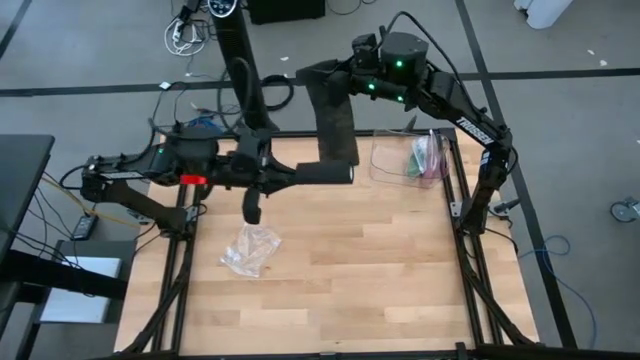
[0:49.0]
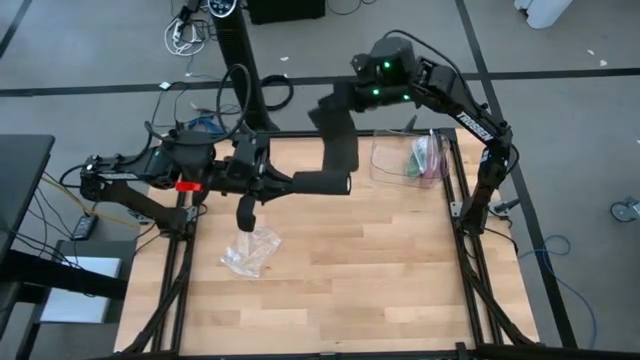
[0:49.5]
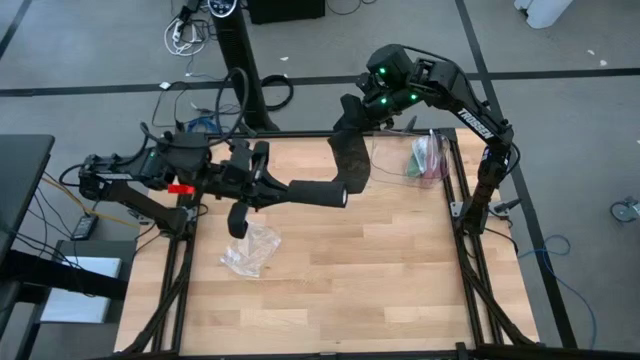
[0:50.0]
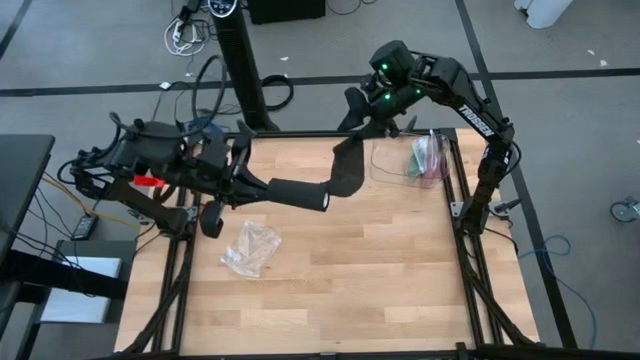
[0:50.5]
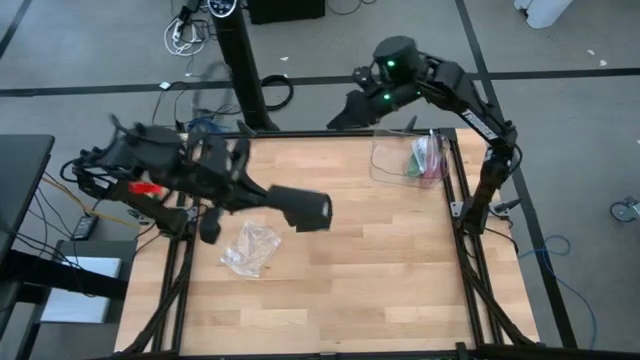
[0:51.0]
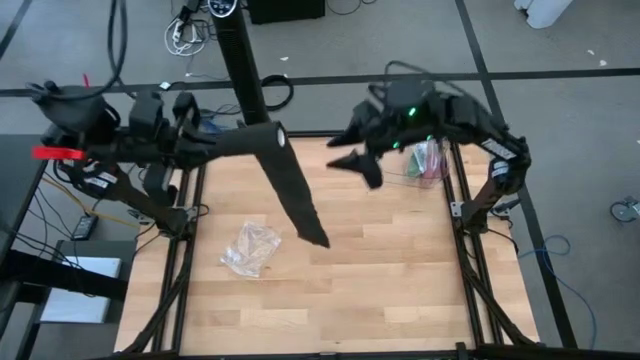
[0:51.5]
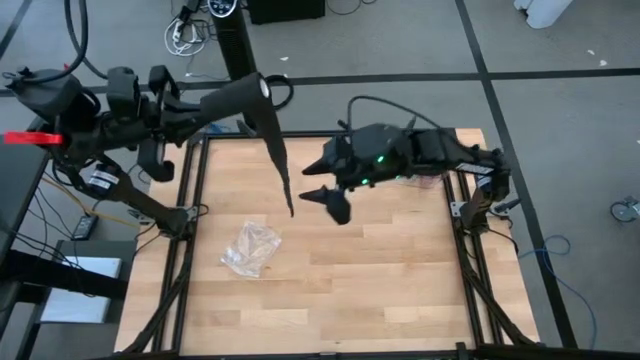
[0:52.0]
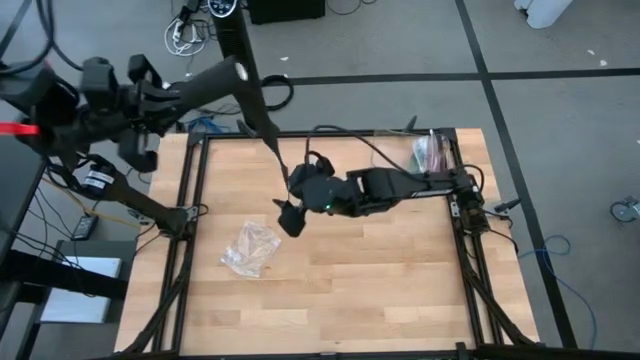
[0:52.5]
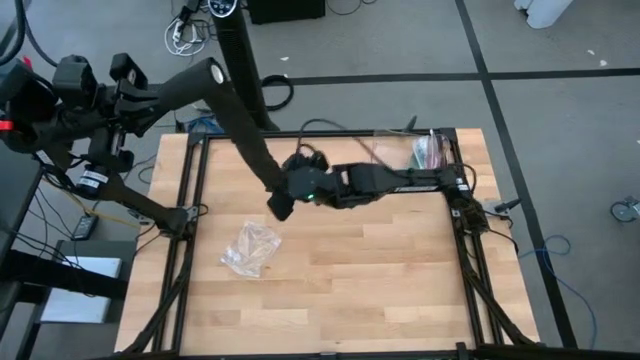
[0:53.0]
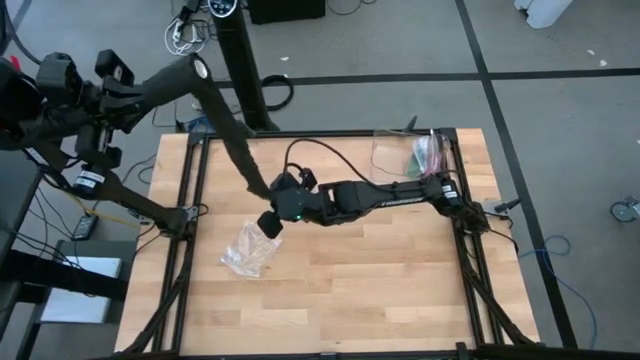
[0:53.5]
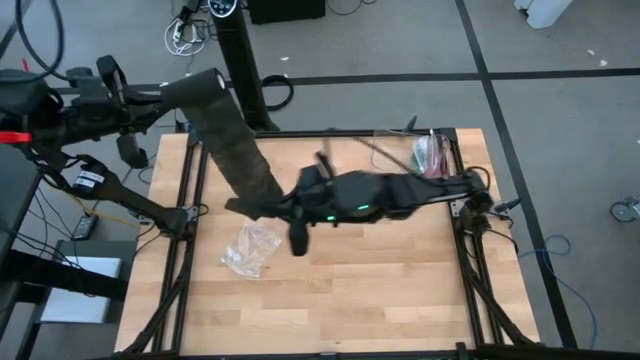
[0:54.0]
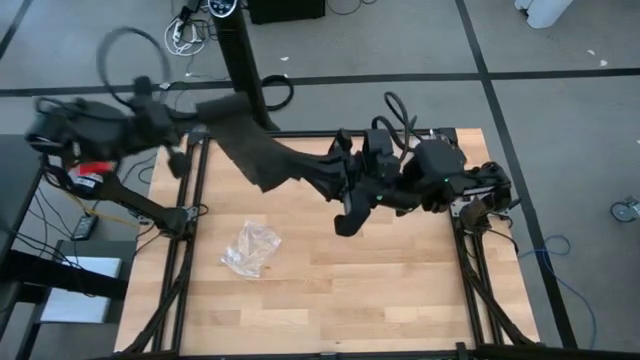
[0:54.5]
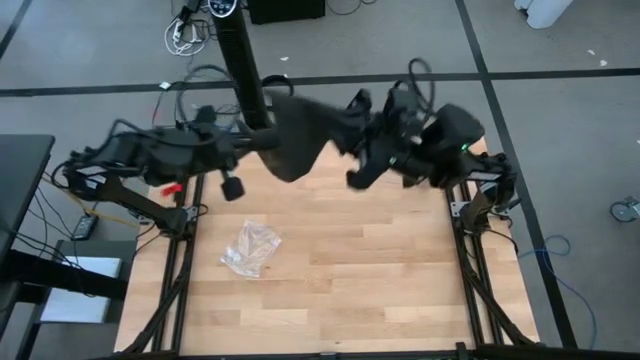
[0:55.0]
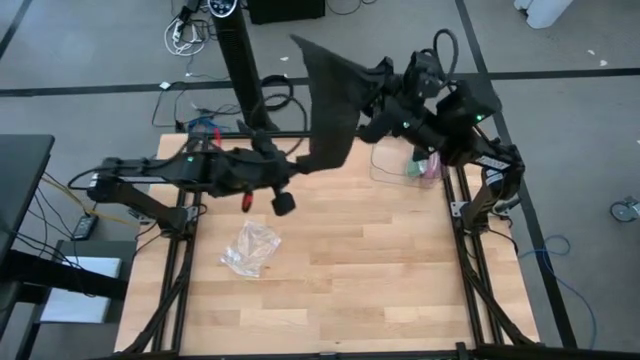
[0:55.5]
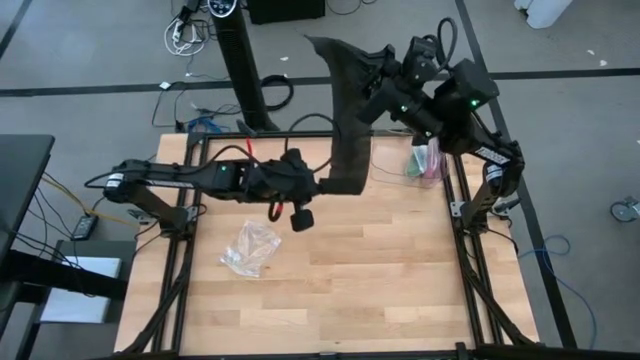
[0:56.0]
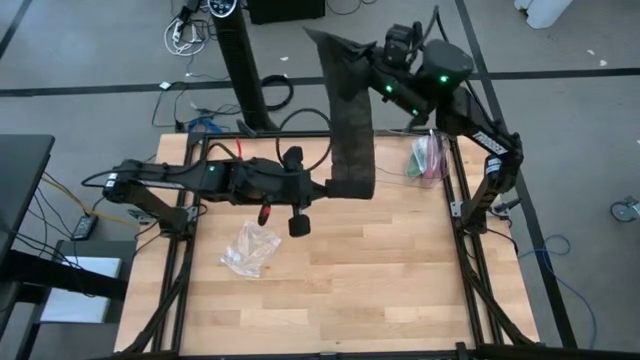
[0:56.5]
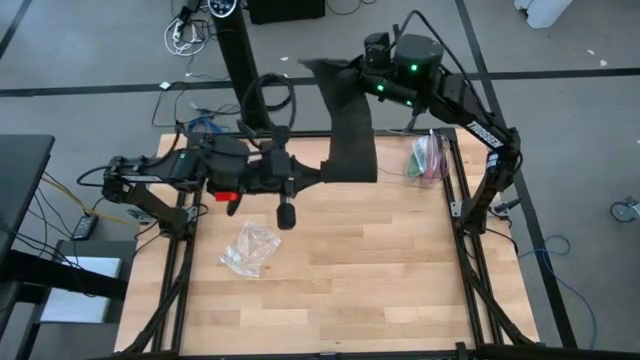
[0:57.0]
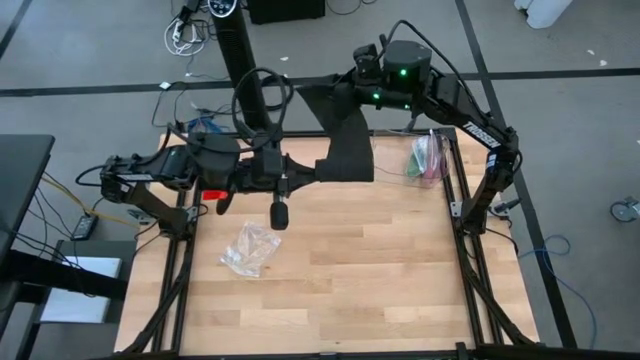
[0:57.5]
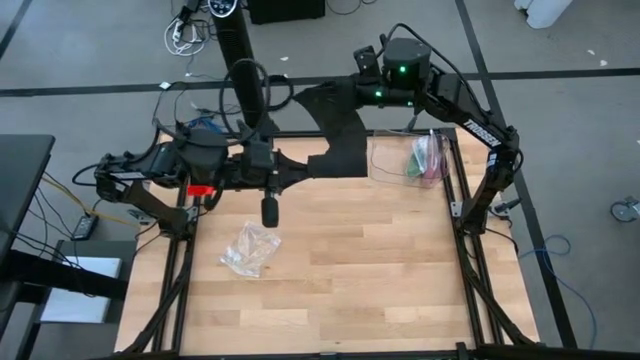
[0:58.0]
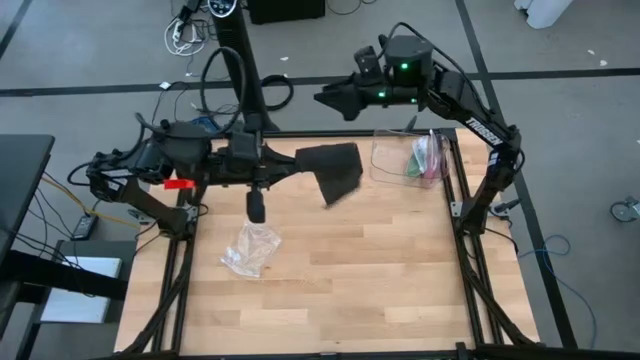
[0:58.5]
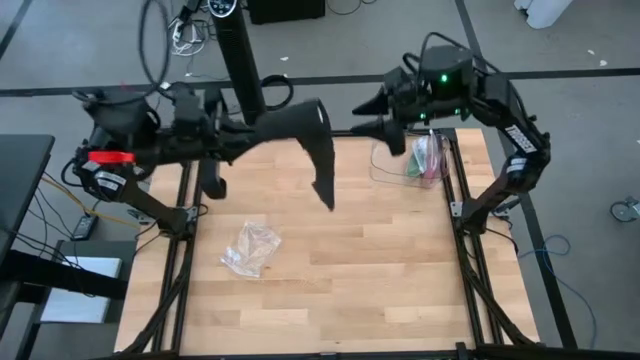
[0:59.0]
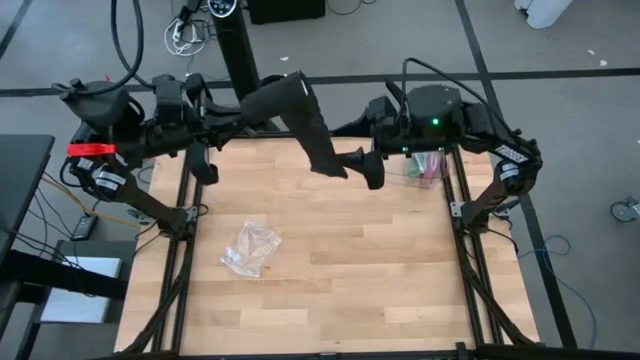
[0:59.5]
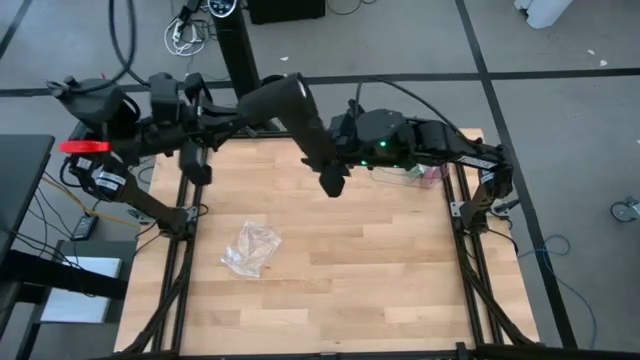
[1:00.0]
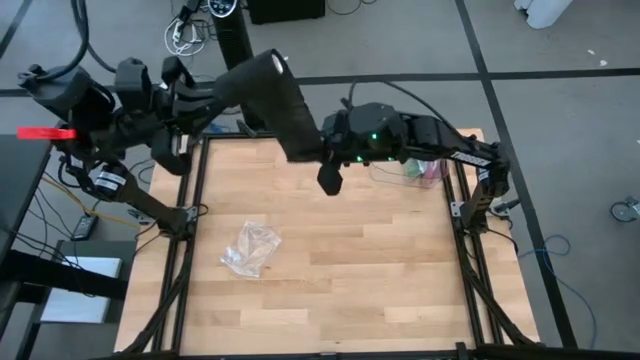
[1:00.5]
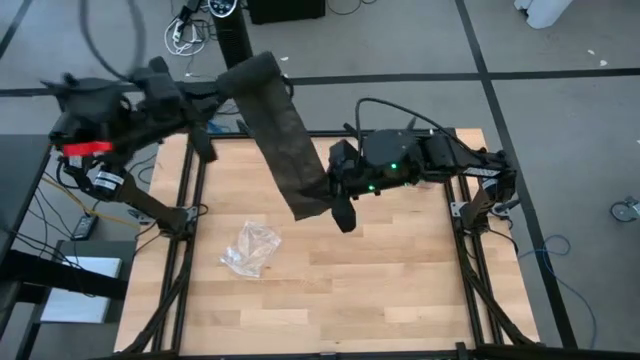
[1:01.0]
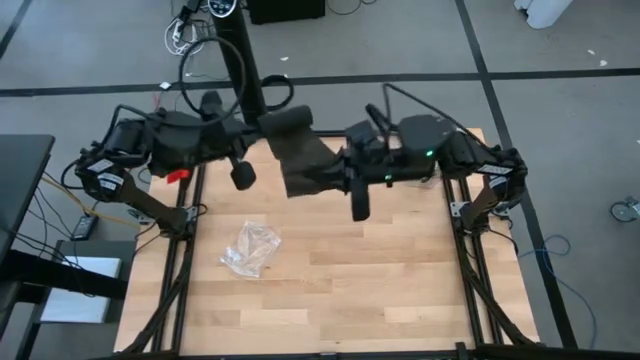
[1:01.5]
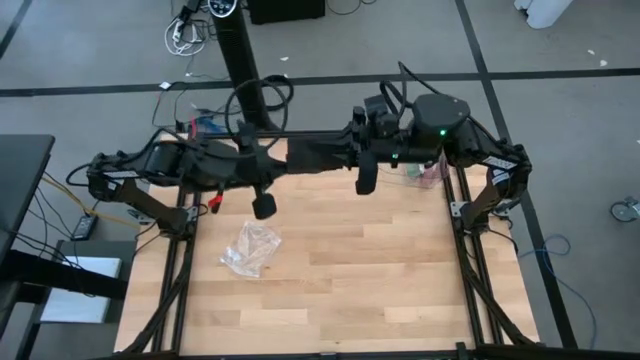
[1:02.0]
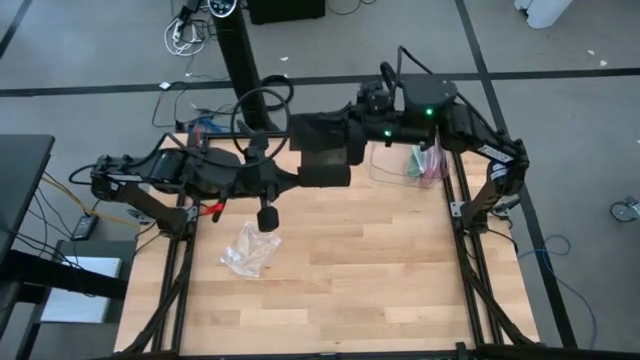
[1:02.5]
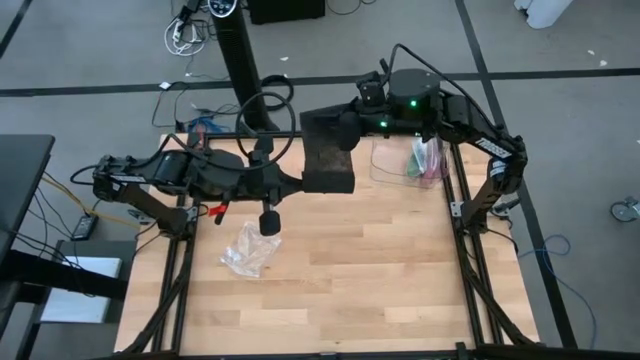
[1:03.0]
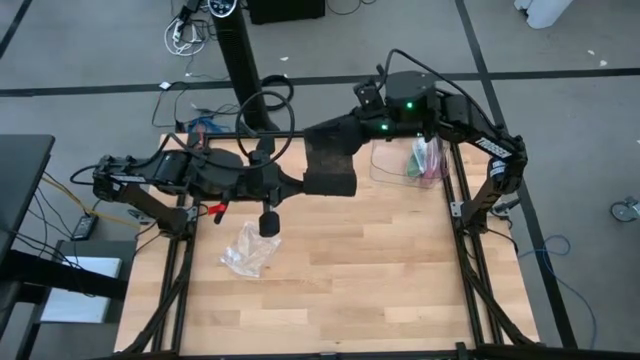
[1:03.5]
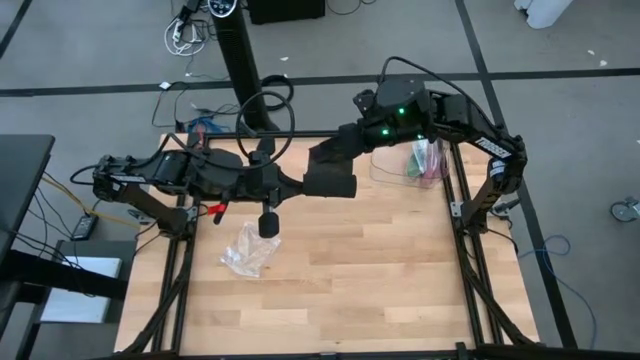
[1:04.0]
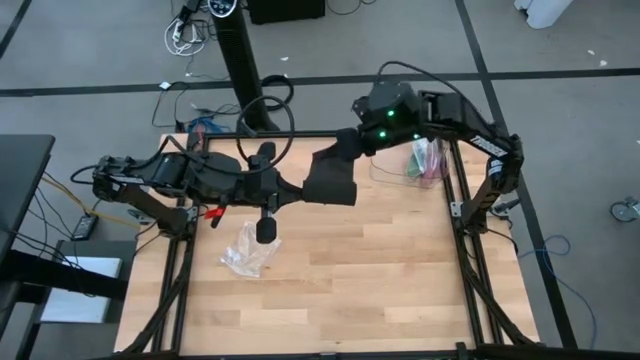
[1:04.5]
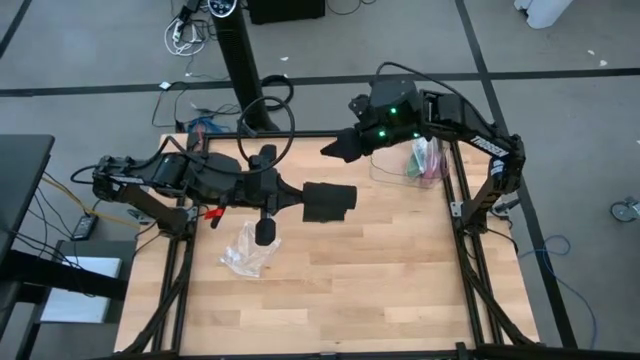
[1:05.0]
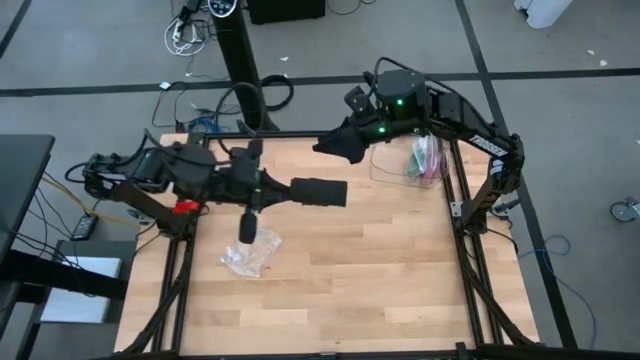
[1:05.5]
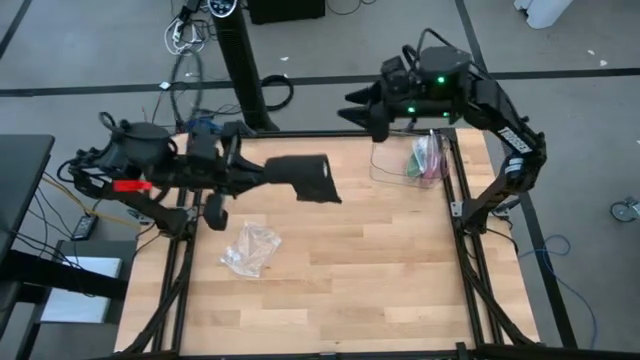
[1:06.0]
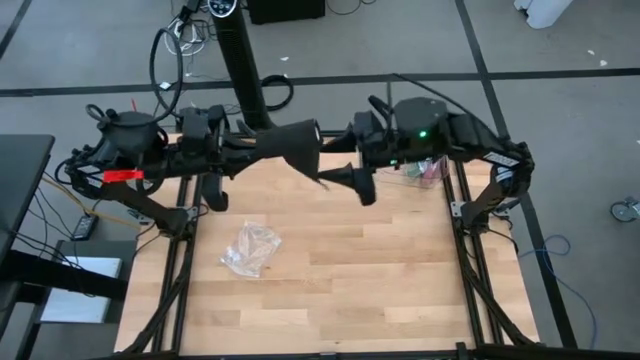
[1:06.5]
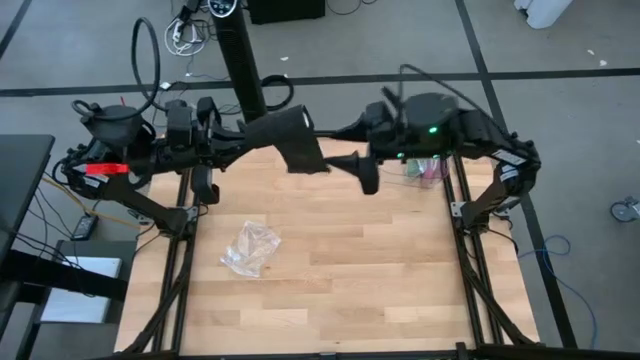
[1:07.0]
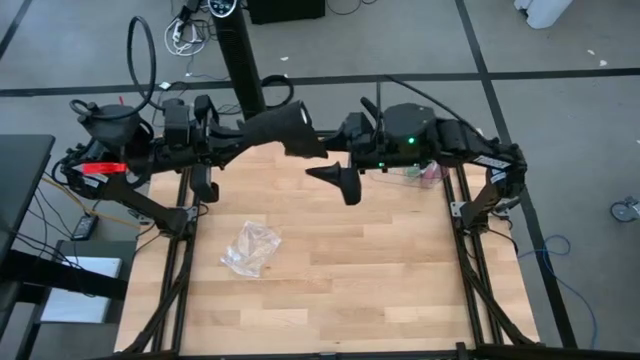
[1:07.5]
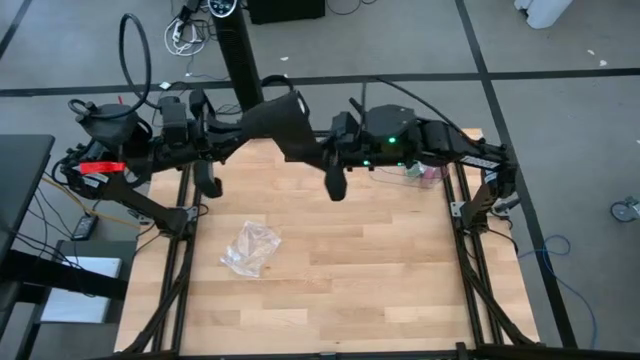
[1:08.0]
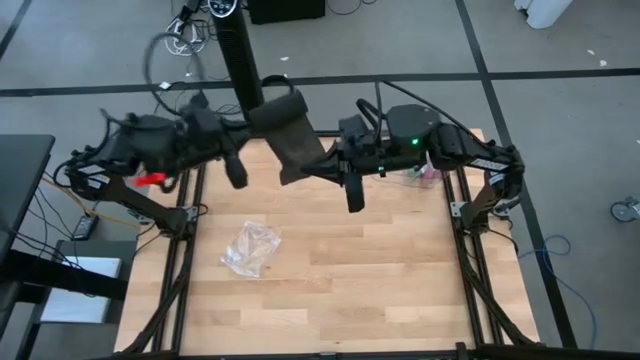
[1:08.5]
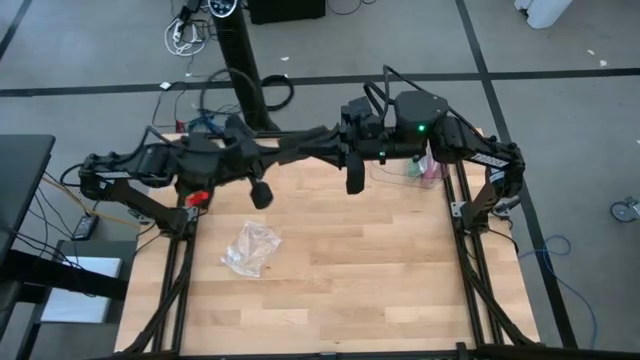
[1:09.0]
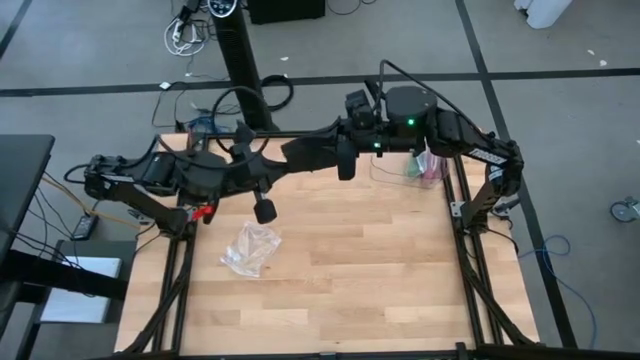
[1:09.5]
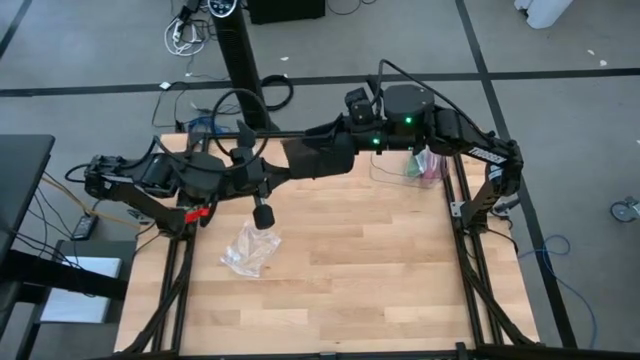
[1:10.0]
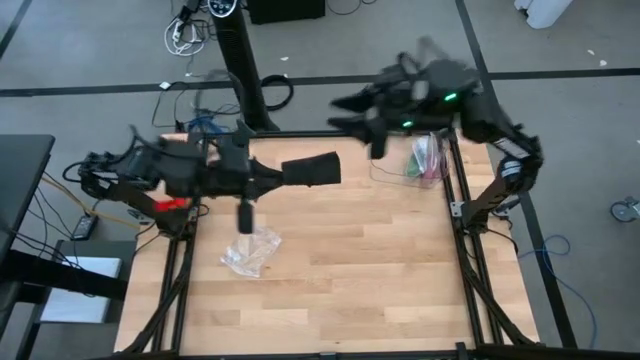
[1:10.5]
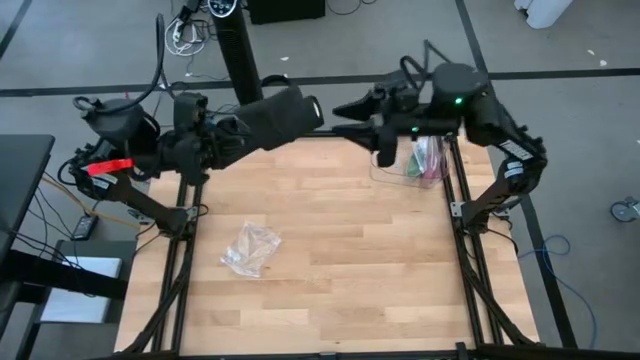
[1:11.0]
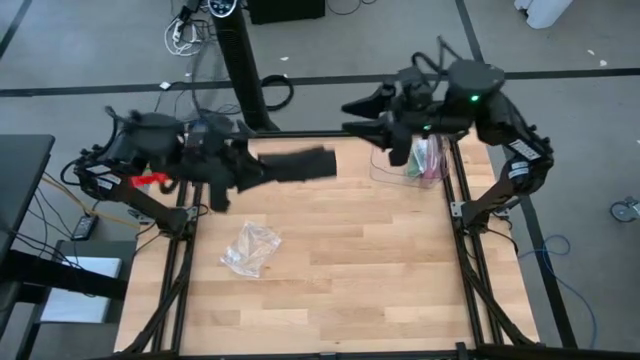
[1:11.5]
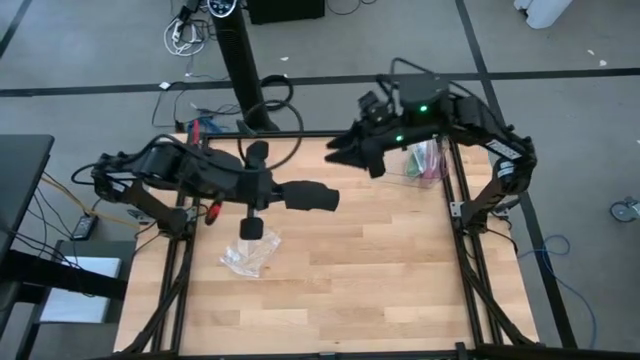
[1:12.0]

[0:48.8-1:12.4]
Task: Roll bandage
Roll the black bandage
